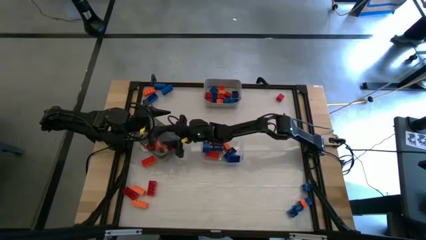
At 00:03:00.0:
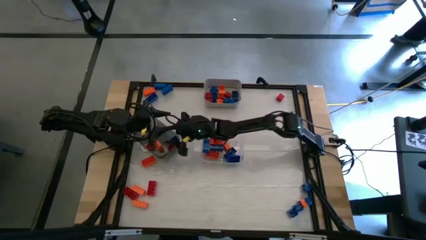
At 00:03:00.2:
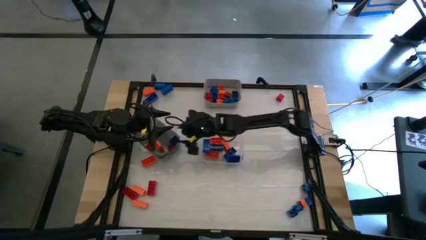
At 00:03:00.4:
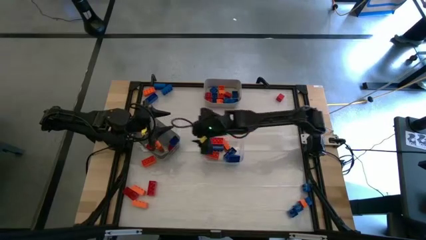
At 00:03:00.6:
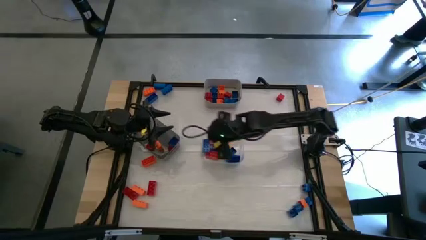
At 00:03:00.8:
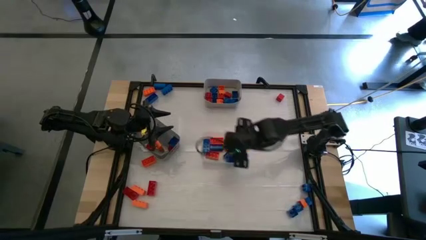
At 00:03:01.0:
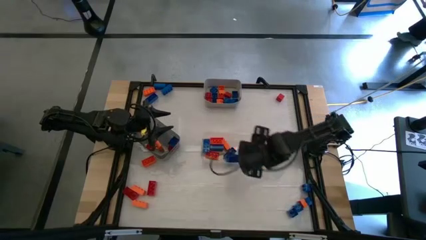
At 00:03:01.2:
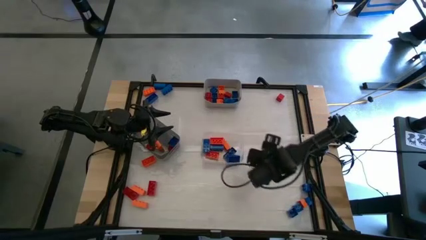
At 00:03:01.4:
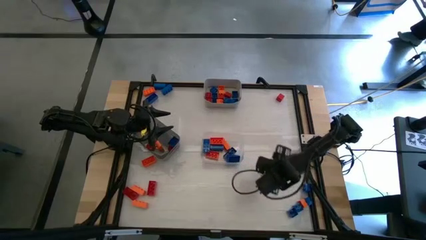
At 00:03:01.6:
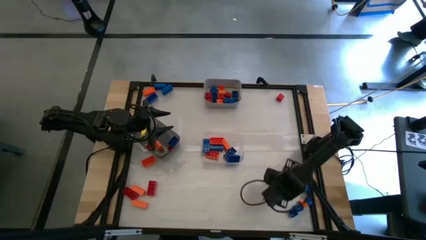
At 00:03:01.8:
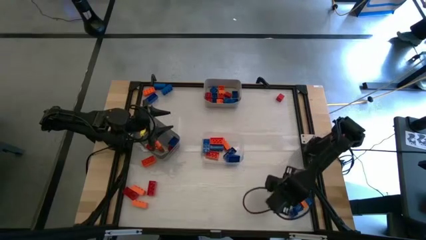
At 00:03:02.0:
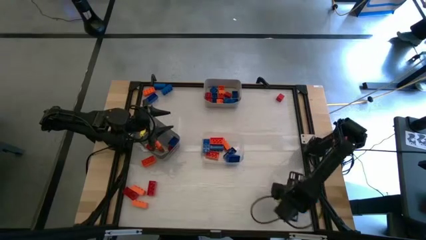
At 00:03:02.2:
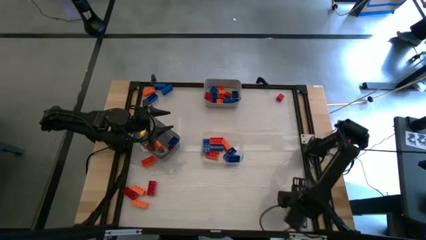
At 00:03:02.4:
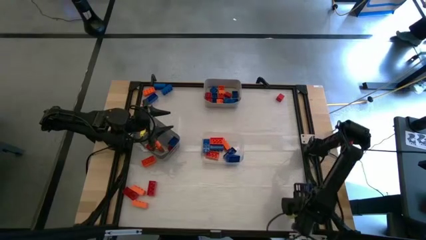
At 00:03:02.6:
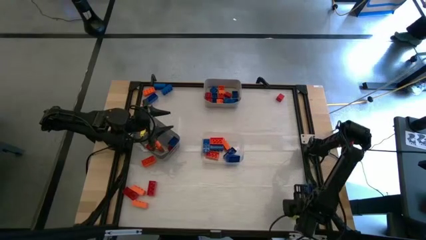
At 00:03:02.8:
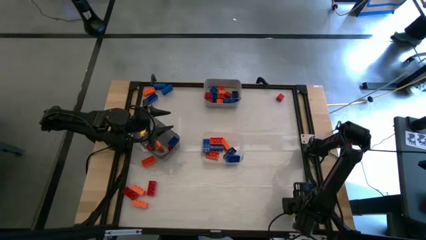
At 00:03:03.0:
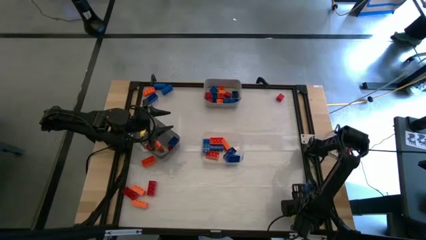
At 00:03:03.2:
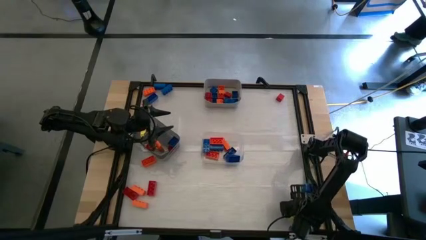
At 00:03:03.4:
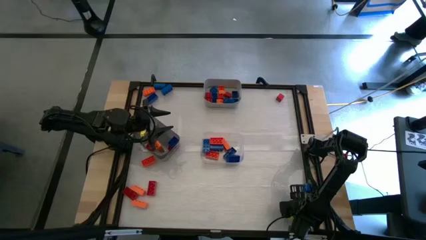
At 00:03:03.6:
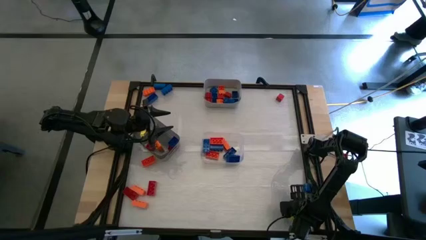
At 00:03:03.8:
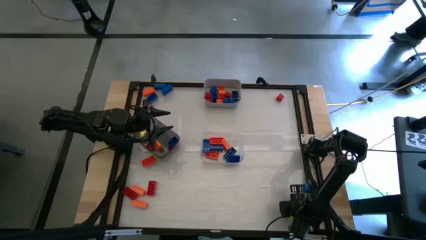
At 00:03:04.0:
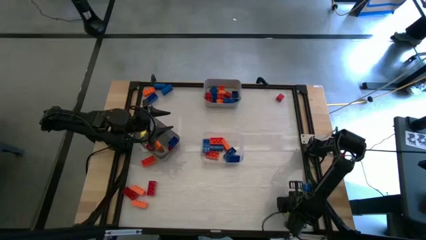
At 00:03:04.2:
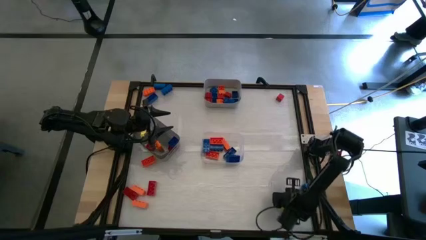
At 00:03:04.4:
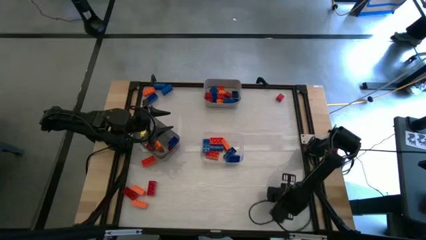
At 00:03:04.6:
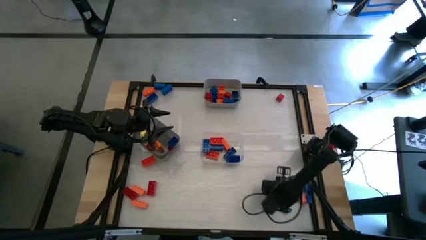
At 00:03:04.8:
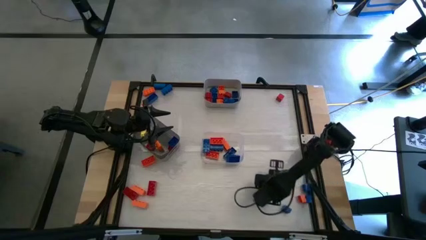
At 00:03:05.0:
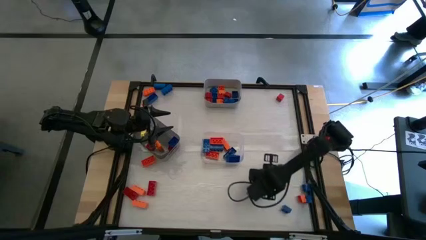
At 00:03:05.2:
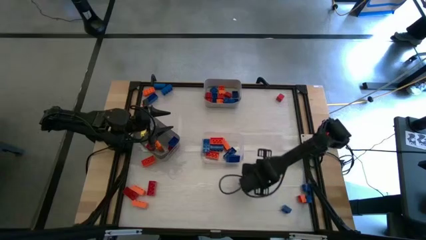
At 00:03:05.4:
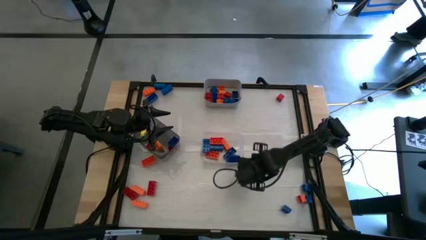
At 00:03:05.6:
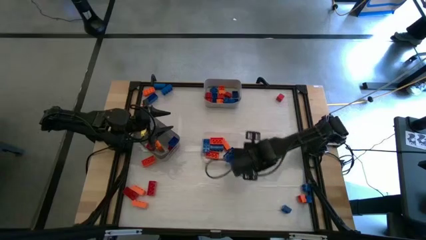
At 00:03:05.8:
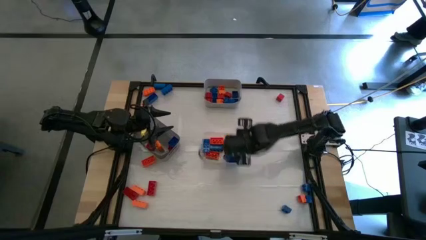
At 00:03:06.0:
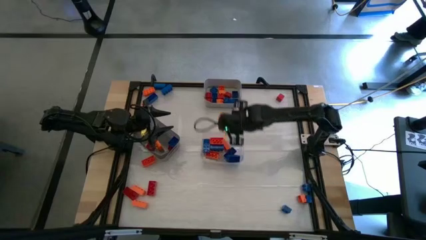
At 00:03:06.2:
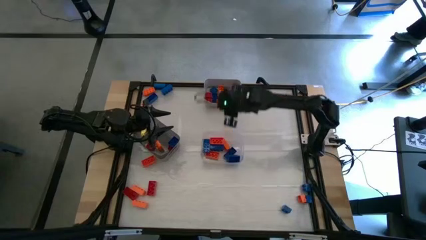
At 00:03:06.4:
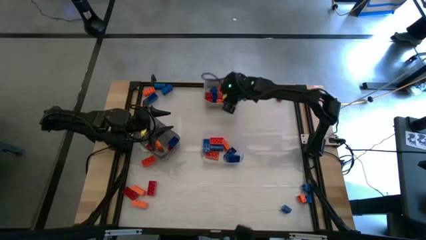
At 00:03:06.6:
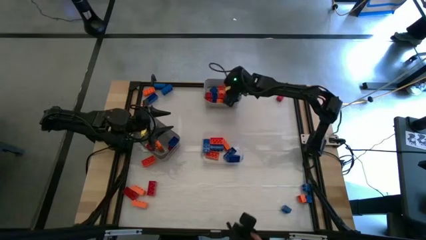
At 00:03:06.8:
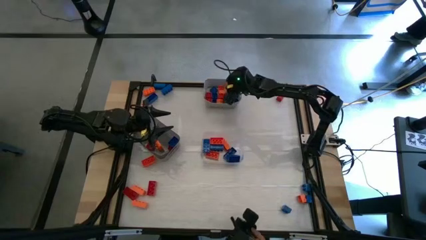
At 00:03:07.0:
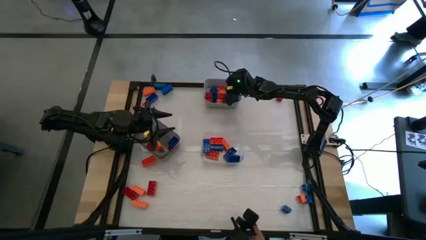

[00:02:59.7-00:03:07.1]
Task: Sort blocks by size
Put the small blue game piece into the gray bin

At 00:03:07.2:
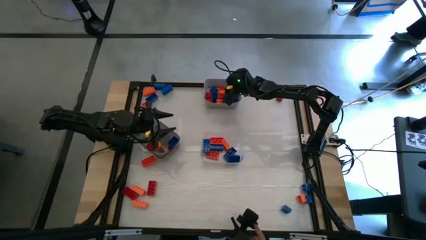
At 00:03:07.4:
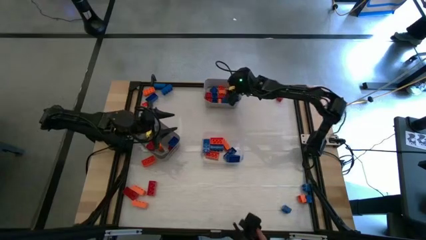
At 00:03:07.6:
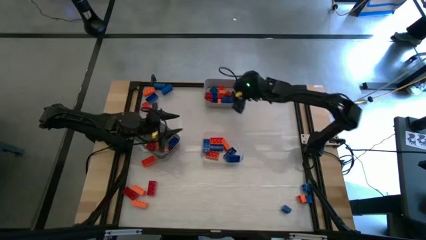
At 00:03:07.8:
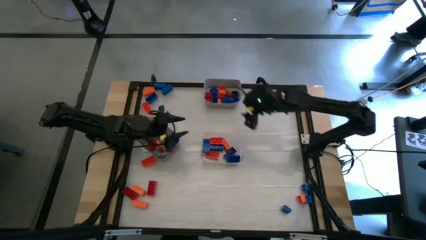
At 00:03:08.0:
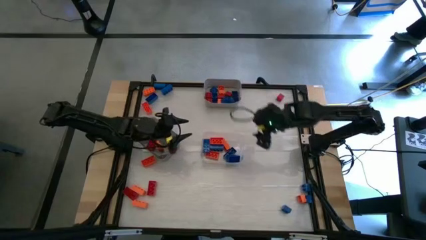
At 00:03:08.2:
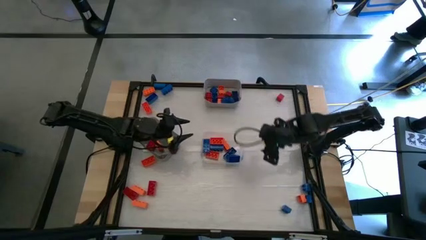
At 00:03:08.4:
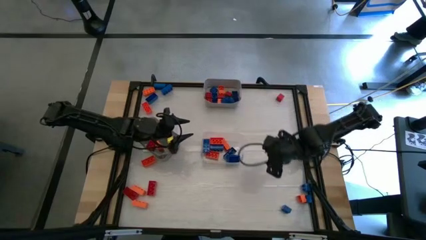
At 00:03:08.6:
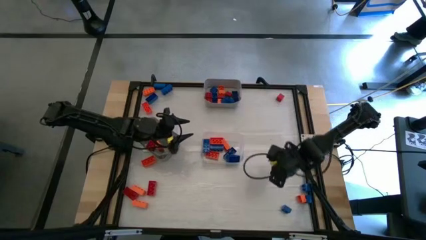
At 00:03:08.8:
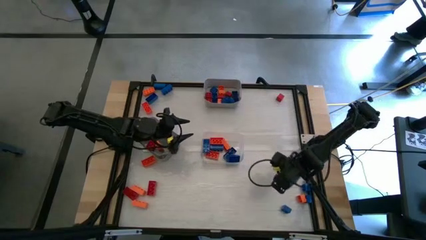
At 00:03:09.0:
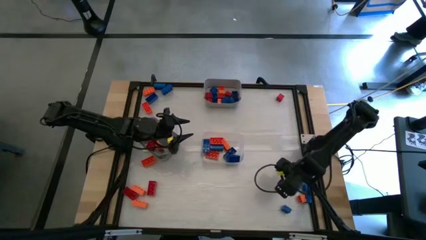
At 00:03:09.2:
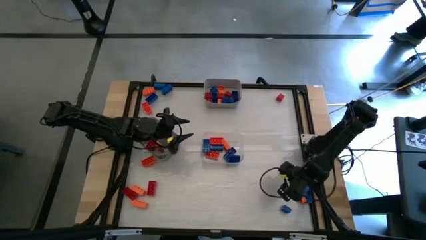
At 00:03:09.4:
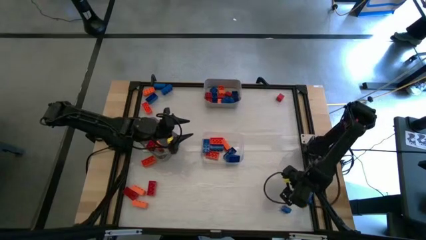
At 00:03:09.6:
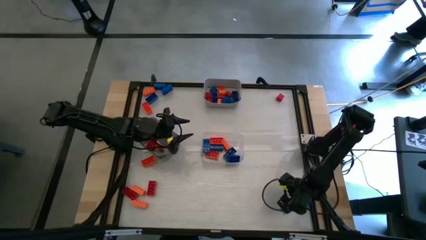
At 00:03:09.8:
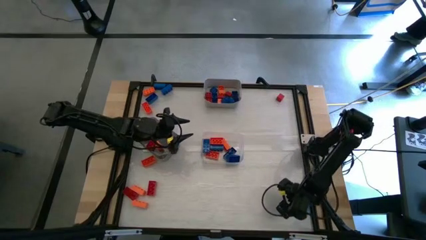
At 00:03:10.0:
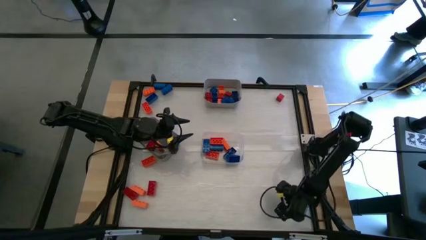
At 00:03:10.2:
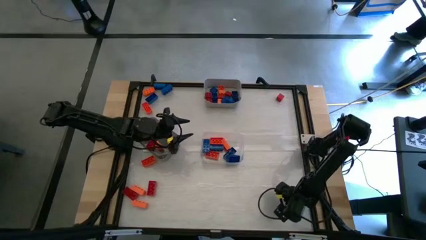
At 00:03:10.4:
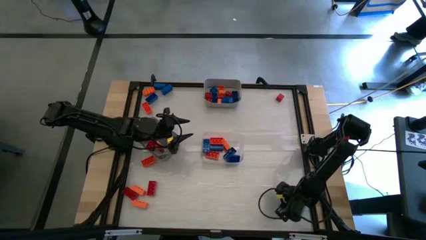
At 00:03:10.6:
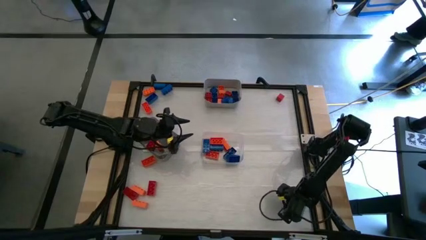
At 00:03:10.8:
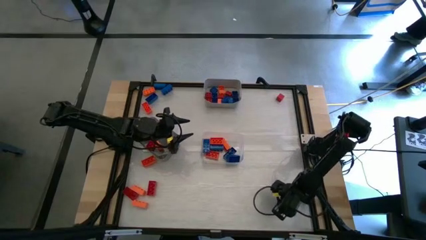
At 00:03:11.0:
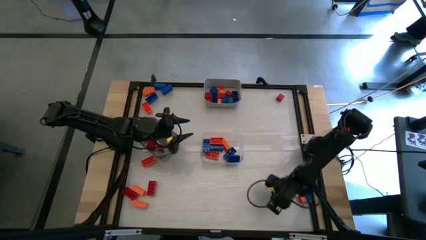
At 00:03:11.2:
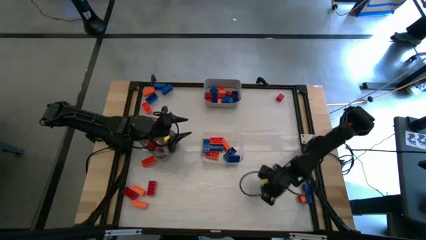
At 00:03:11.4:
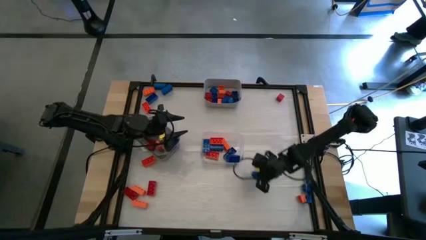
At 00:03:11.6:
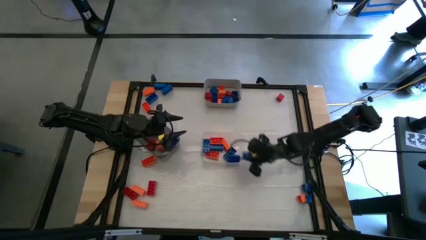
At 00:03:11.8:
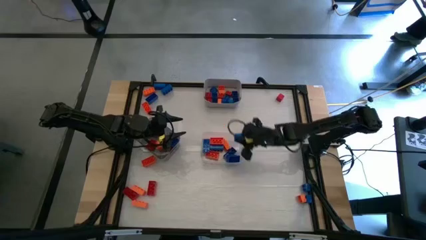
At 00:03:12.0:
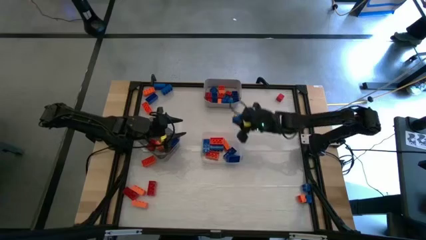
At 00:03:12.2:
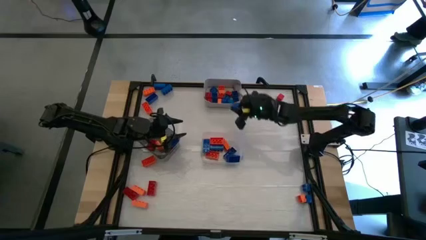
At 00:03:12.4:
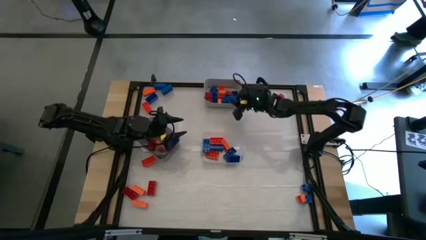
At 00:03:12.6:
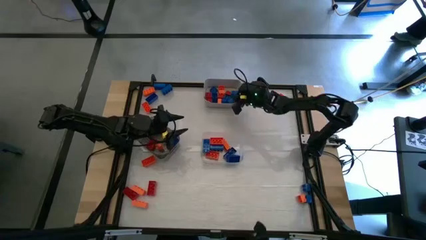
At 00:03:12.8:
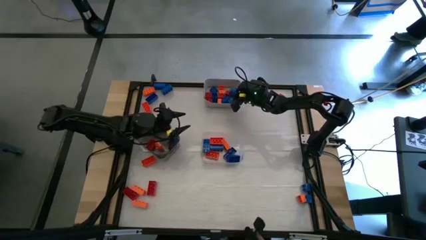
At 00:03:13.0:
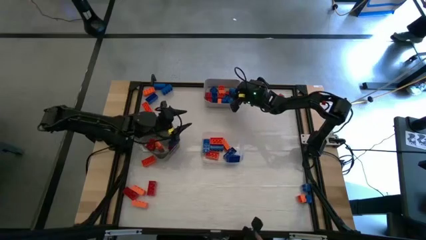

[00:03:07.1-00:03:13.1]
Put the small blue game piece into the gray bin
